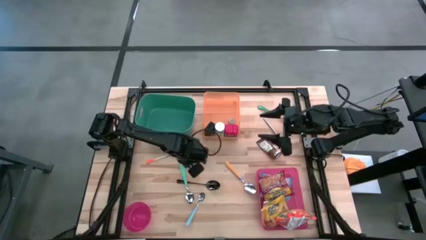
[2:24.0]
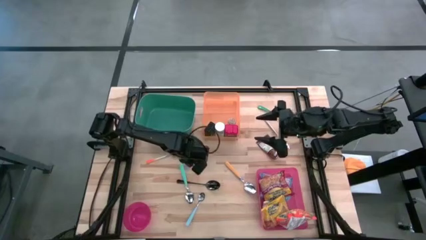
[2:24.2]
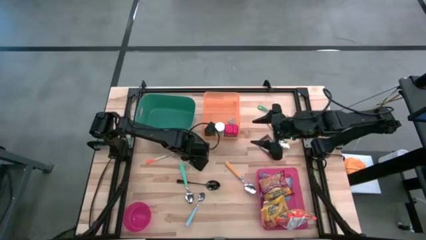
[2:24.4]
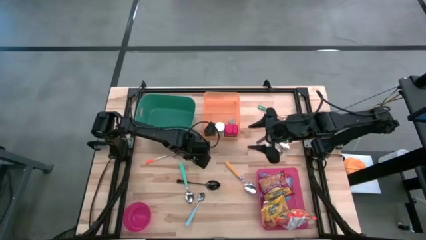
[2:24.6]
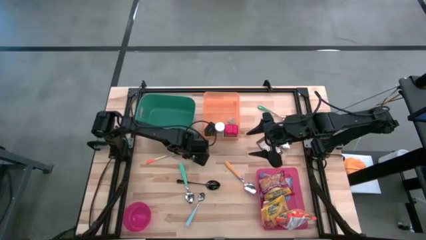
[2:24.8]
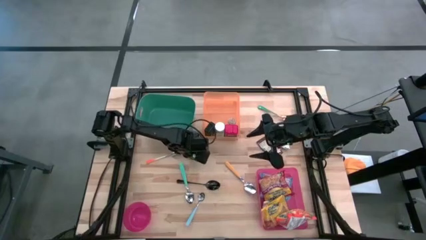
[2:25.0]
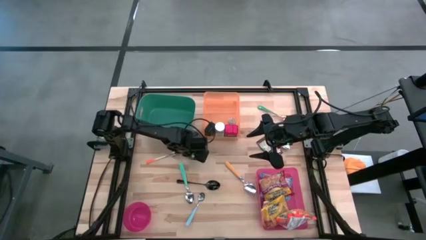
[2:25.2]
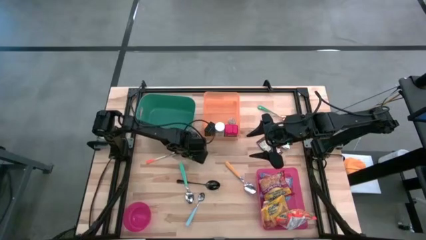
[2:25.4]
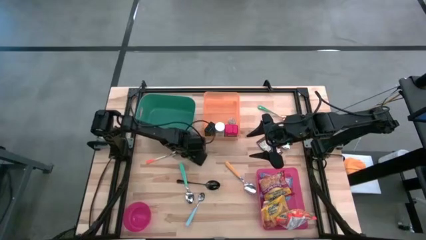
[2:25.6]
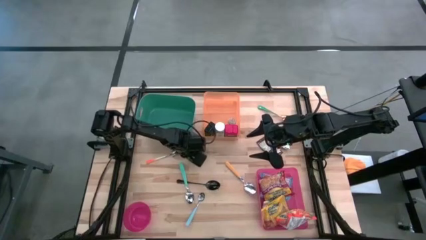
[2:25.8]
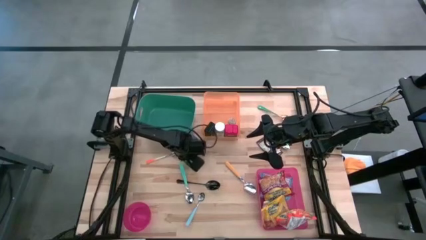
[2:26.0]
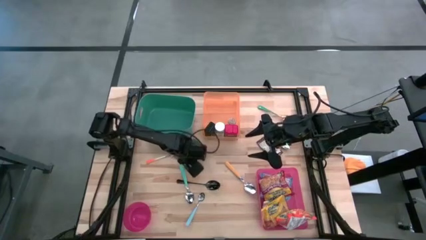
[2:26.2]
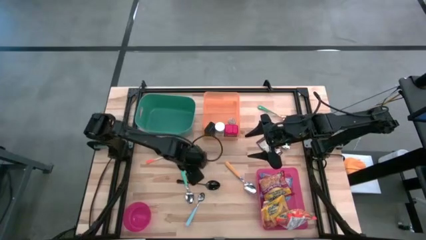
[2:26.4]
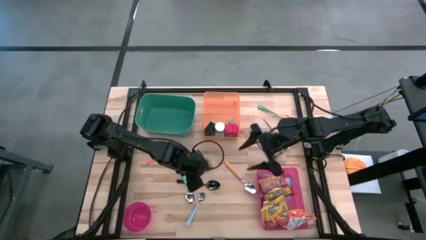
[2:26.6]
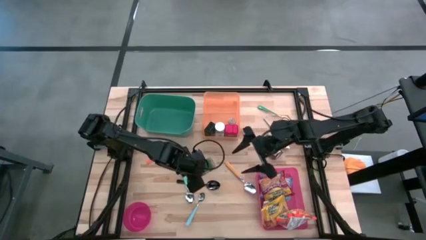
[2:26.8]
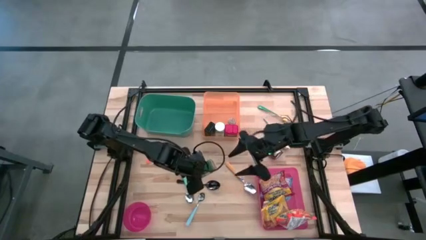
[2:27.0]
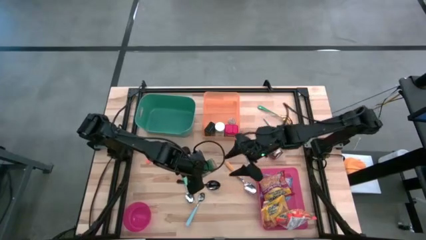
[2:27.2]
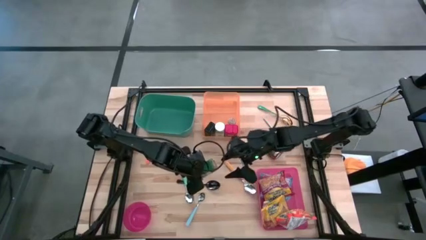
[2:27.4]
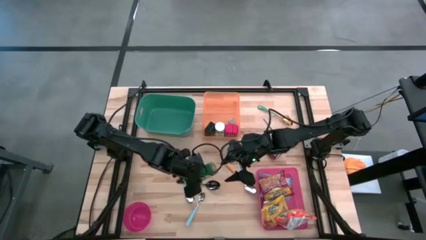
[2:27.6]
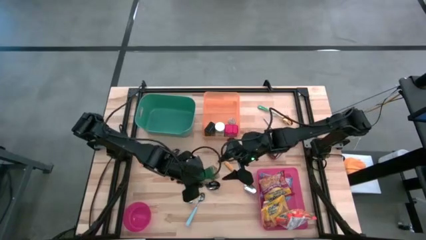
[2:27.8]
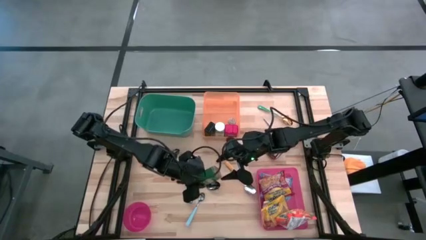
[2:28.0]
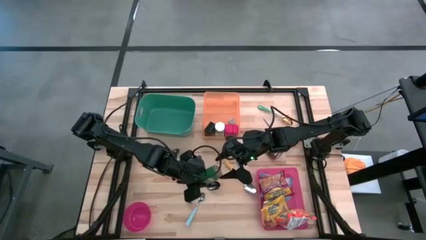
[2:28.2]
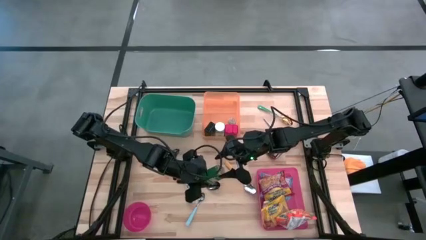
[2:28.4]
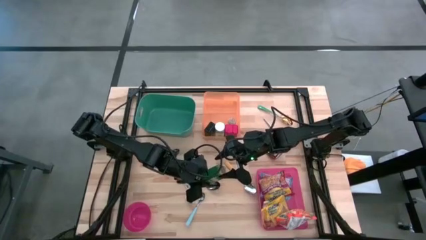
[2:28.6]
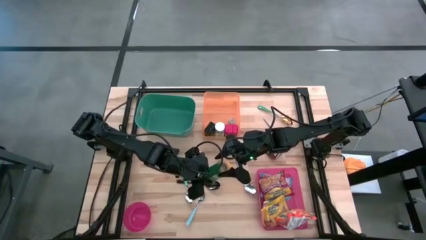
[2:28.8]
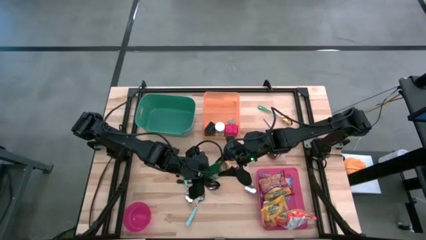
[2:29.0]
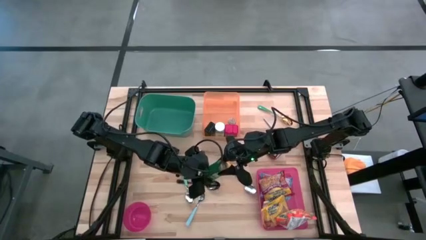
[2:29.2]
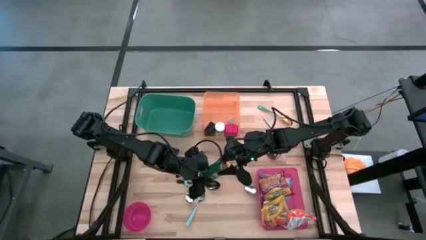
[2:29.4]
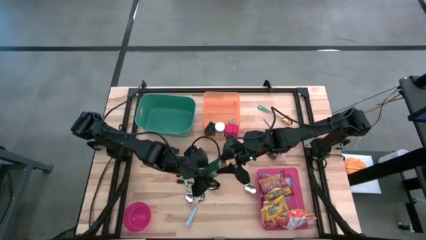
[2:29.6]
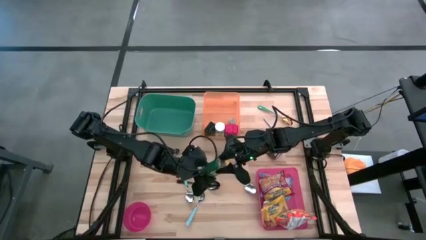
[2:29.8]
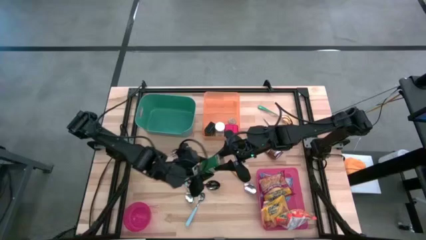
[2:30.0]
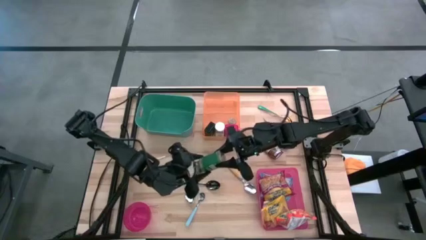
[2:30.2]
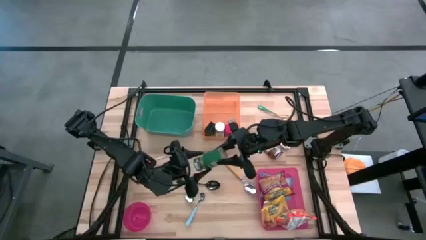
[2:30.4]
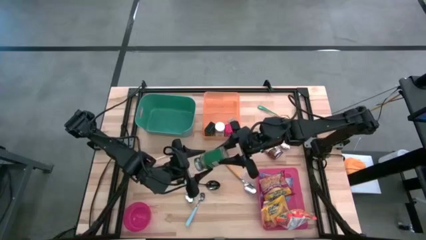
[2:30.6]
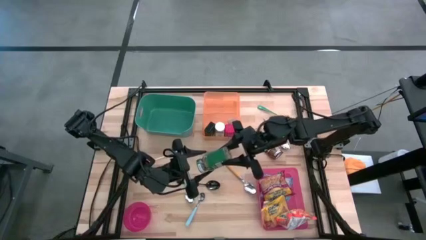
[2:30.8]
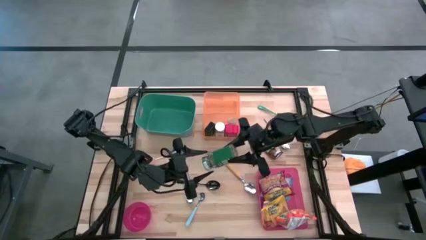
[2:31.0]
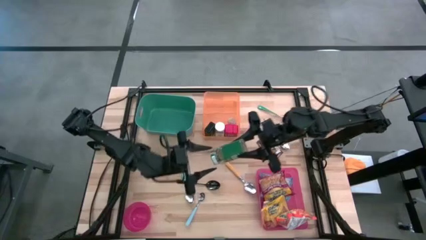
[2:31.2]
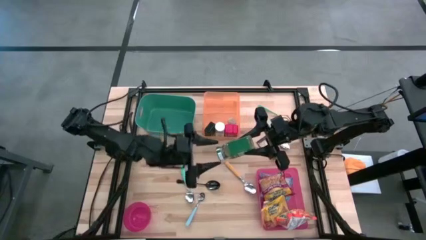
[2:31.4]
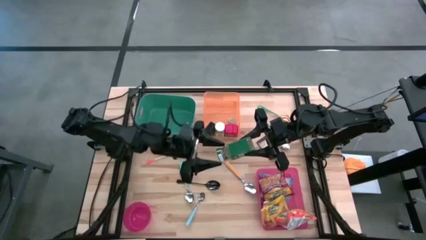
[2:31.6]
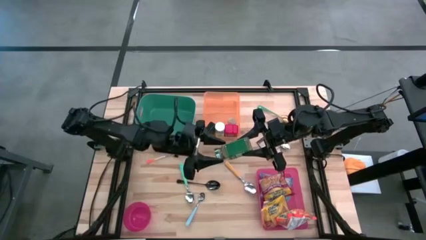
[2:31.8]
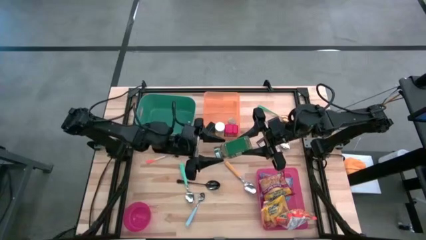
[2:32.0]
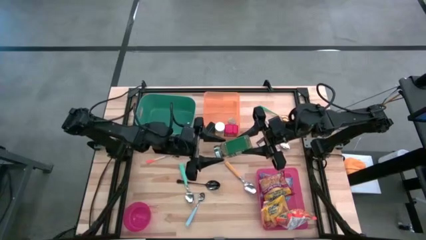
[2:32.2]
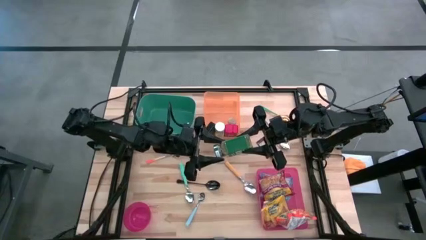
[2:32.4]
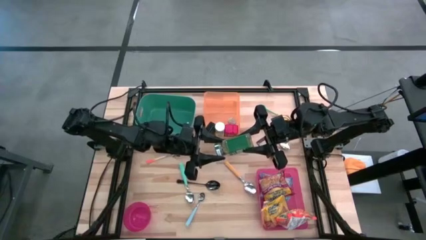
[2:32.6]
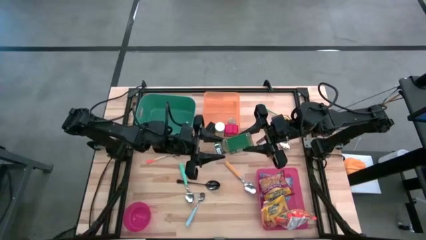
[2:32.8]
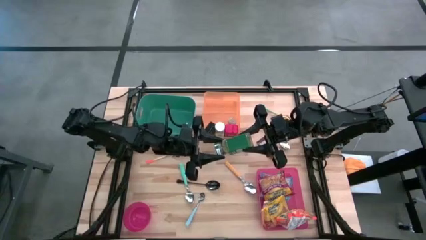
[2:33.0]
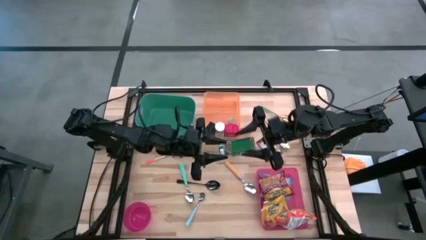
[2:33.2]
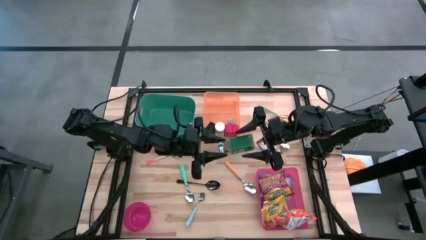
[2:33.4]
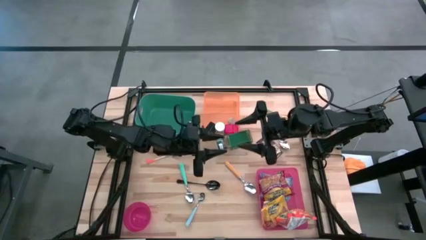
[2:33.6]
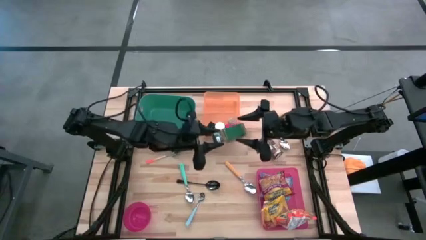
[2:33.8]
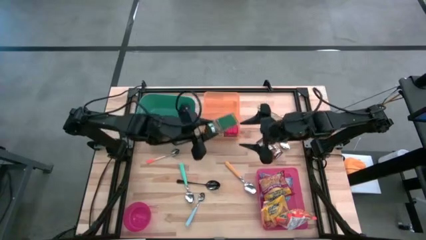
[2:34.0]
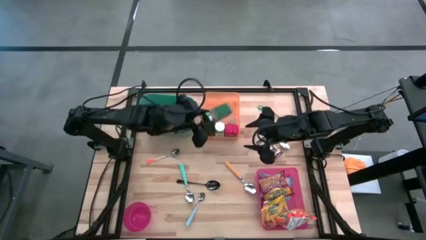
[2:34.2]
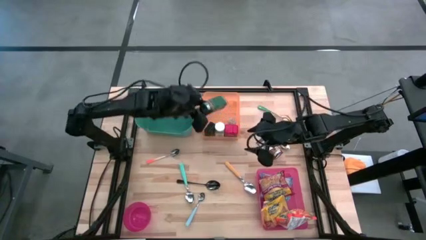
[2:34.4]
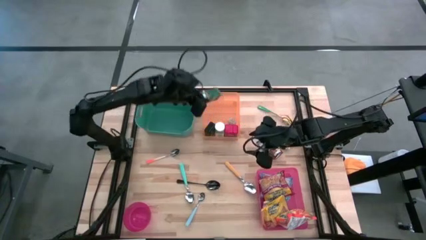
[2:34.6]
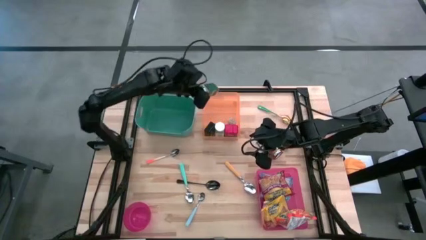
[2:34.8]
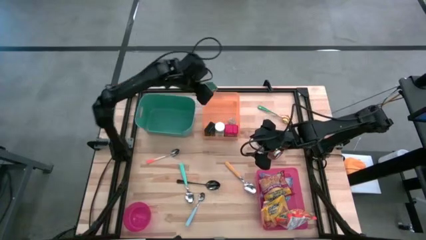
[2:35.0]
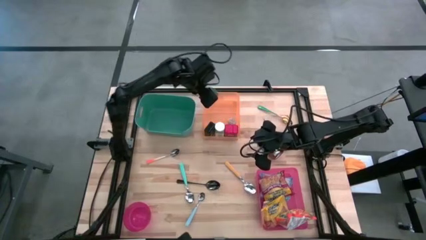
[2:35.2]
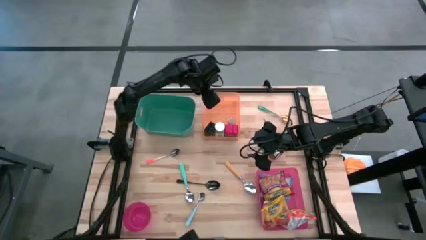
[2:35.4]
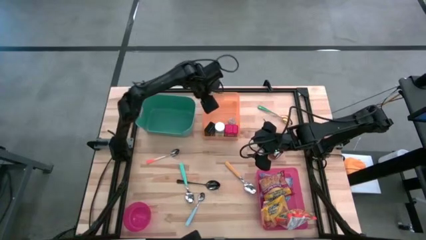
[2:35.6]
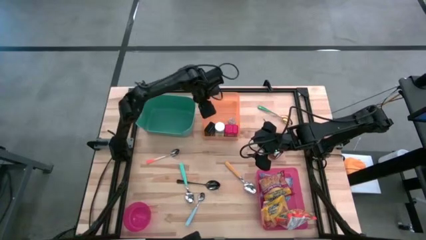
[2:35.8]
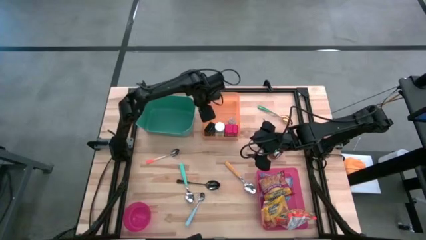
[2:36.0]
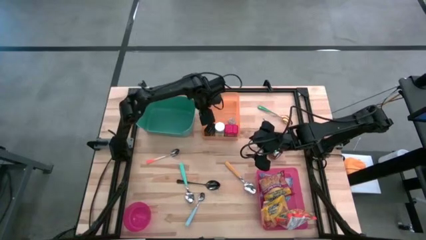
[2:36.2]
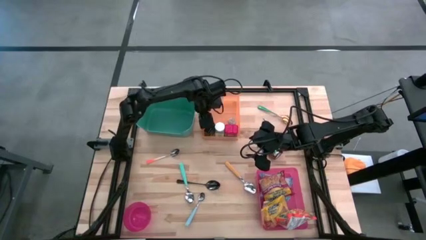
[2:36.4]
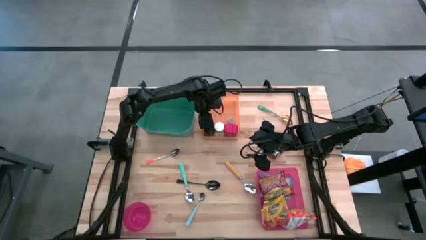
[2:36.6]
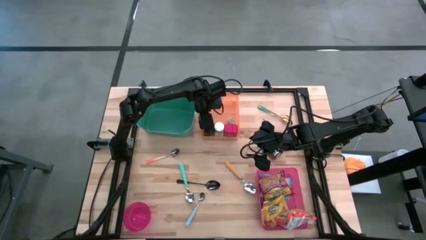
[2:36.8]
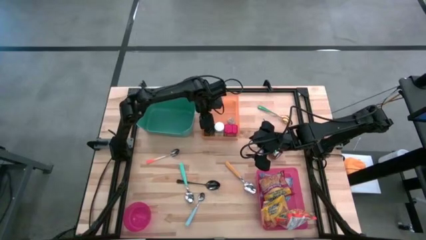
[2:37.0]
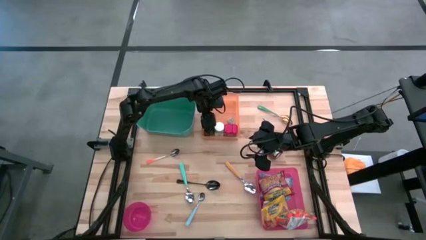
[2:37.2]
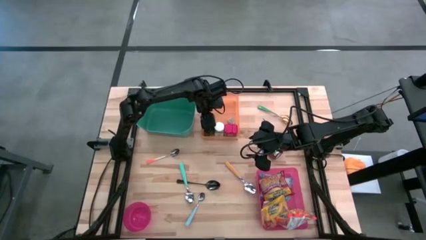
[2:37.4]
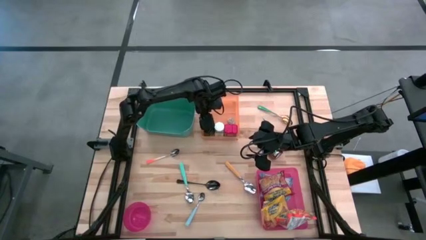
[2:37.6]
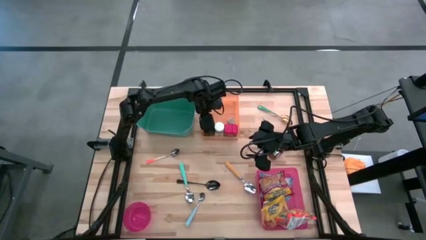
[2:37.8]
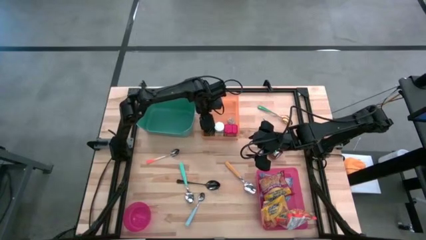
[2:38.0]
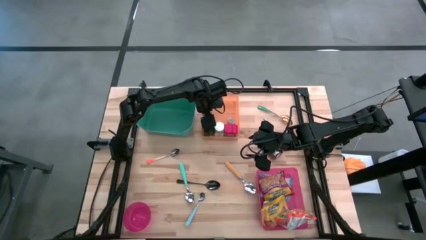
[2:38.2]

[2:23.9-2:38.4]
Put the green seasoning bottle into the orange bin
